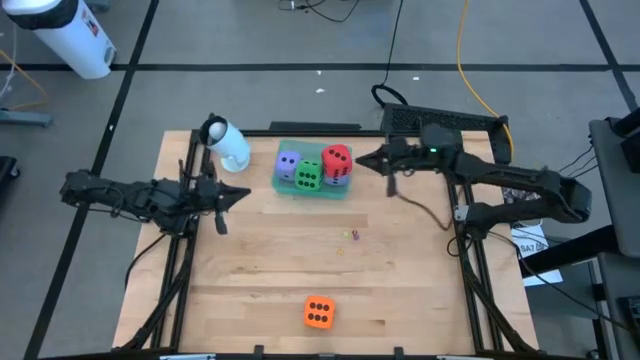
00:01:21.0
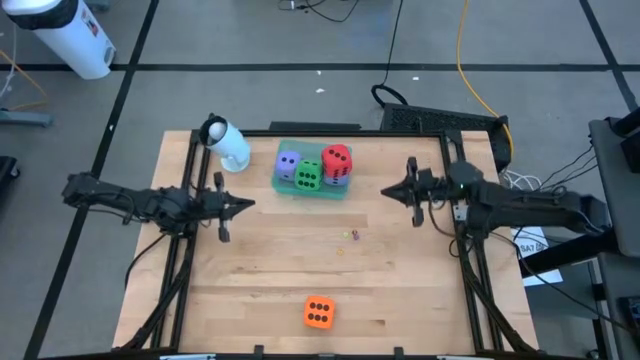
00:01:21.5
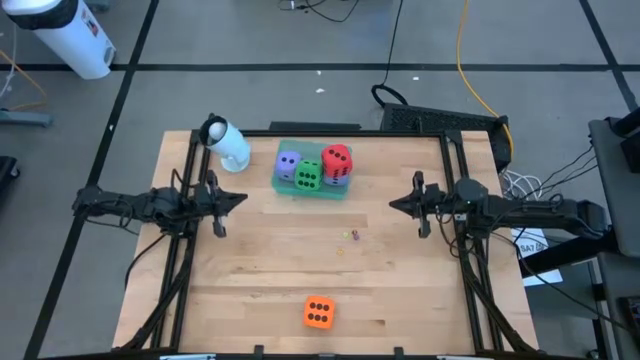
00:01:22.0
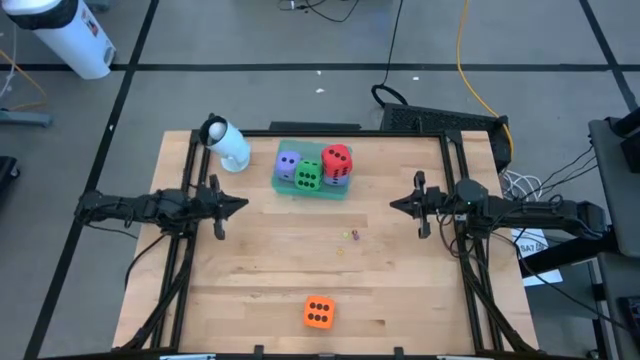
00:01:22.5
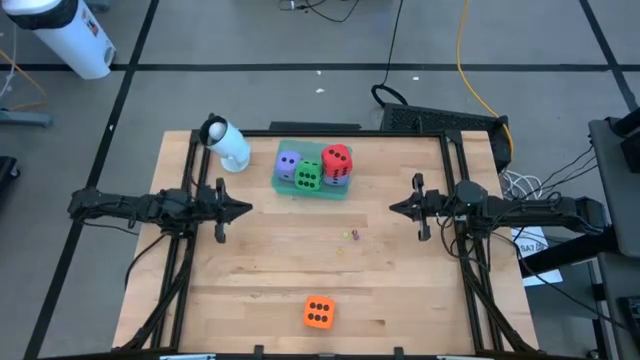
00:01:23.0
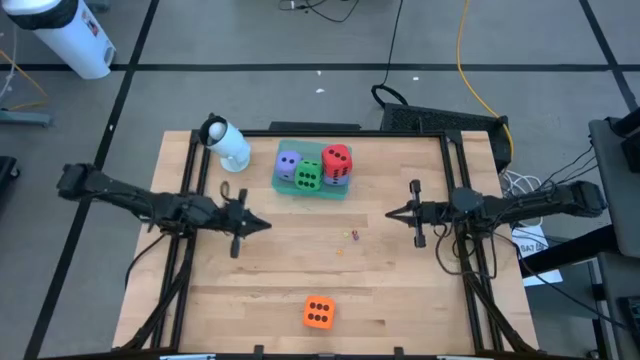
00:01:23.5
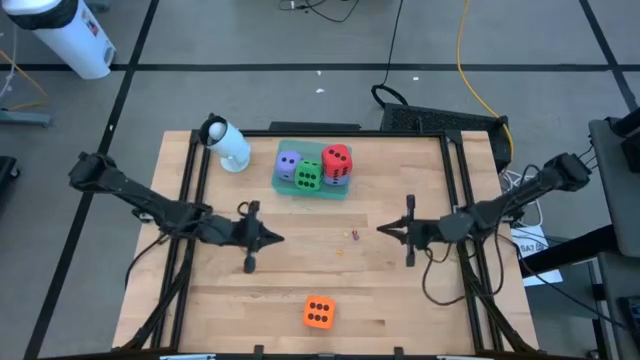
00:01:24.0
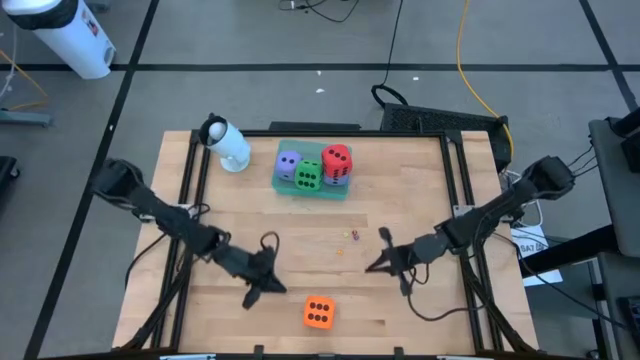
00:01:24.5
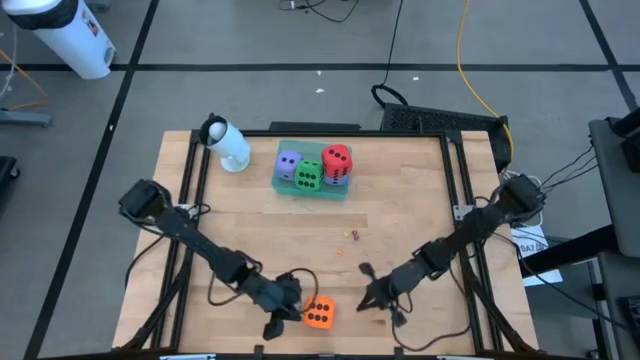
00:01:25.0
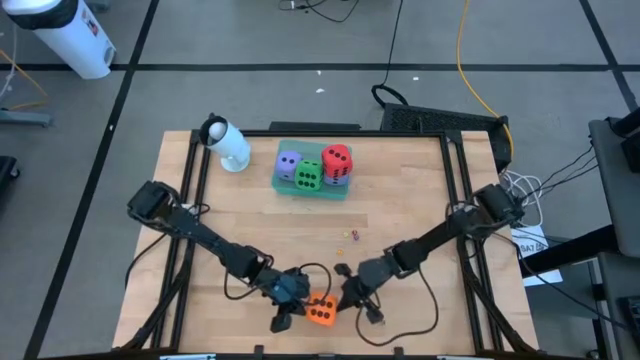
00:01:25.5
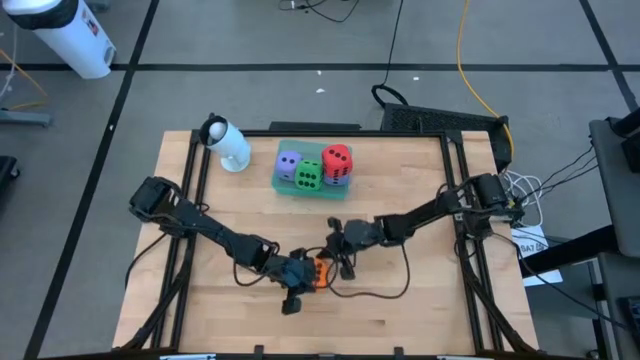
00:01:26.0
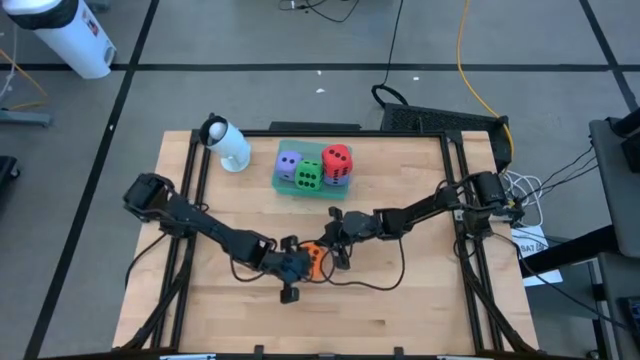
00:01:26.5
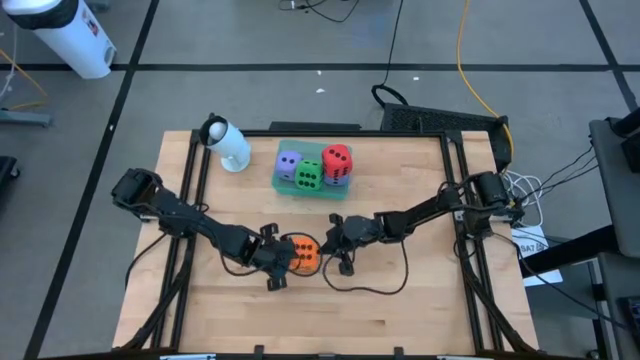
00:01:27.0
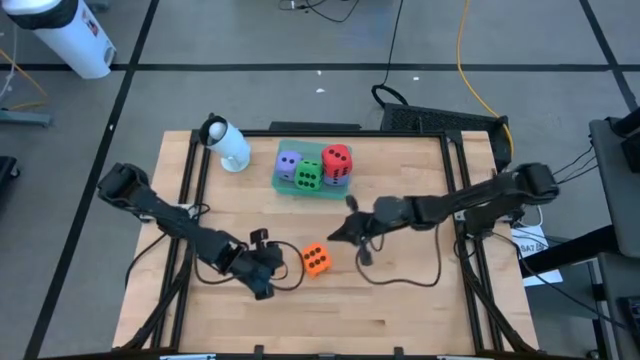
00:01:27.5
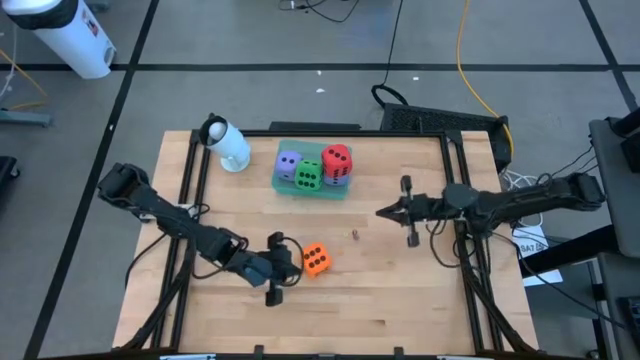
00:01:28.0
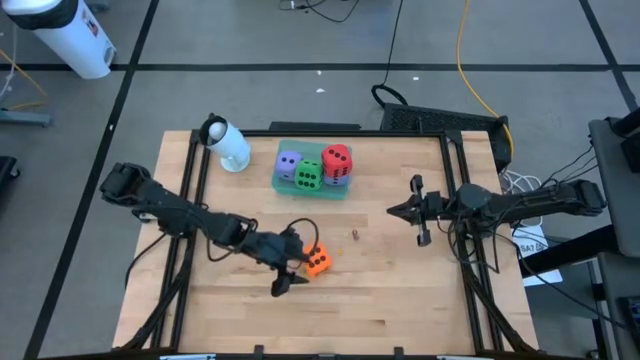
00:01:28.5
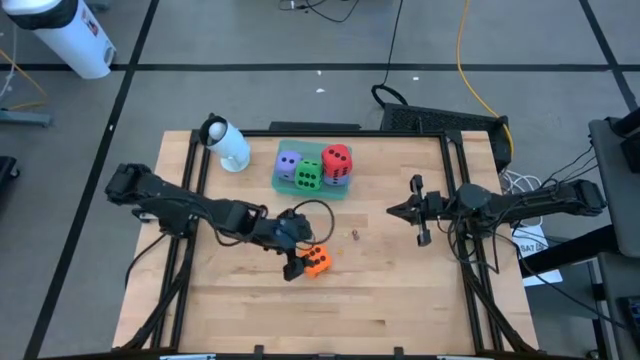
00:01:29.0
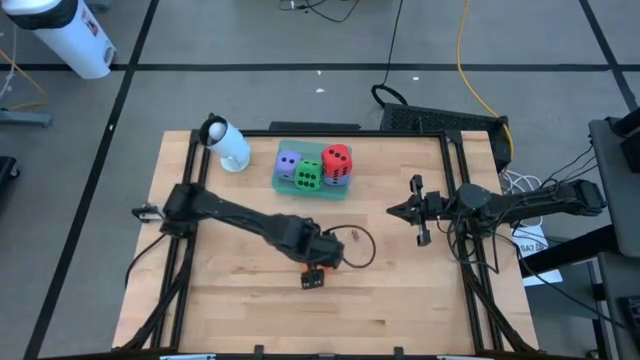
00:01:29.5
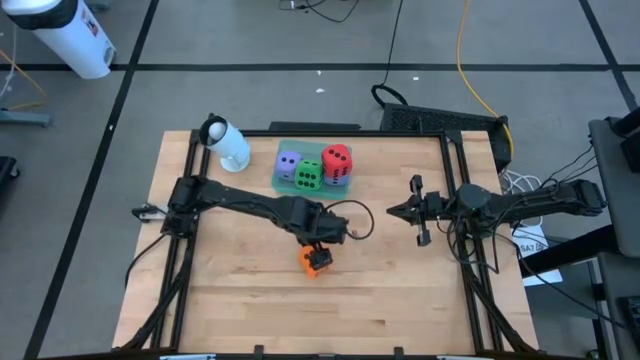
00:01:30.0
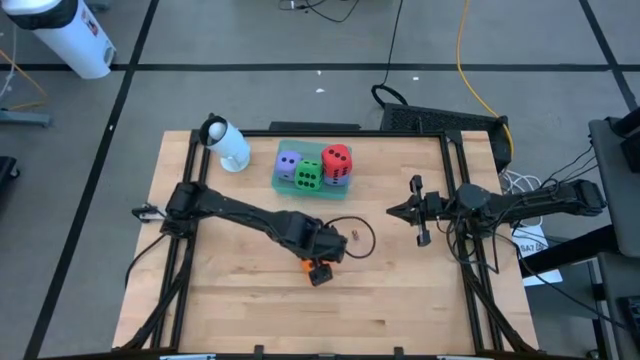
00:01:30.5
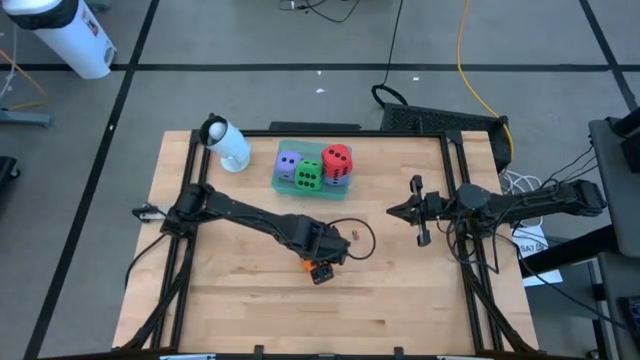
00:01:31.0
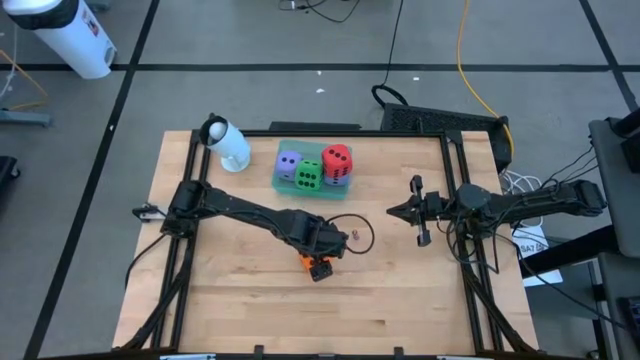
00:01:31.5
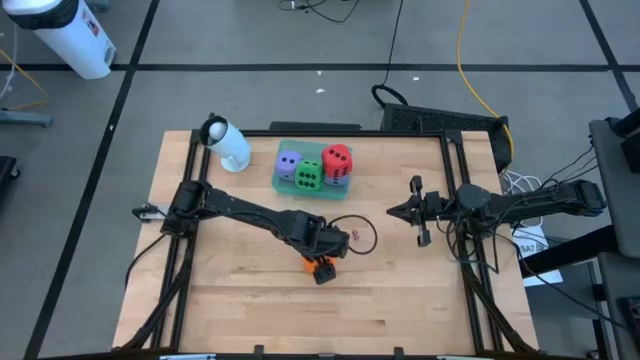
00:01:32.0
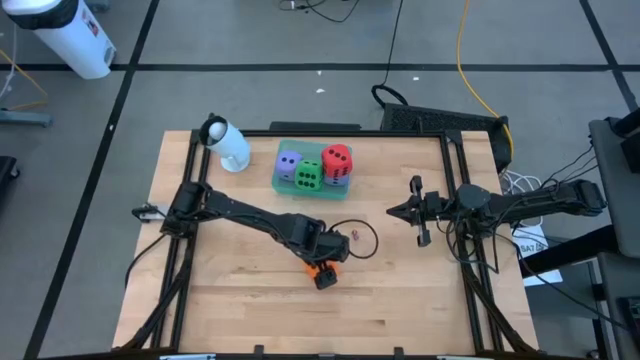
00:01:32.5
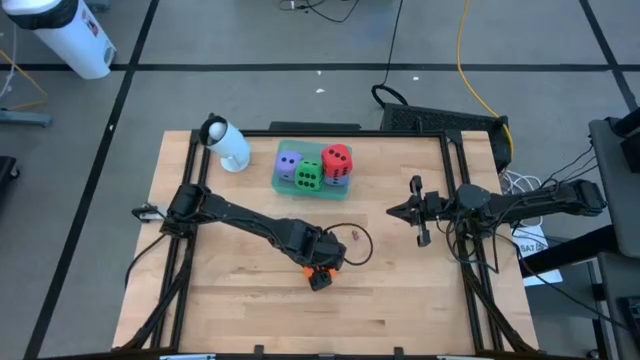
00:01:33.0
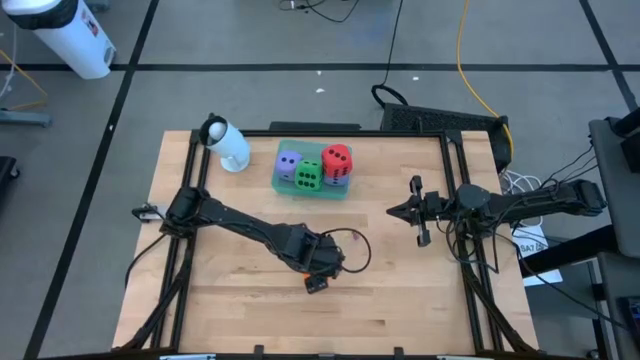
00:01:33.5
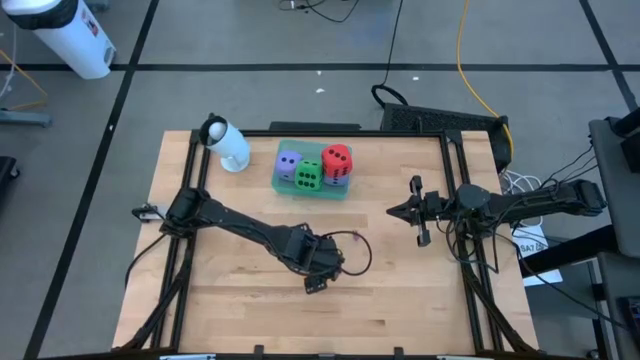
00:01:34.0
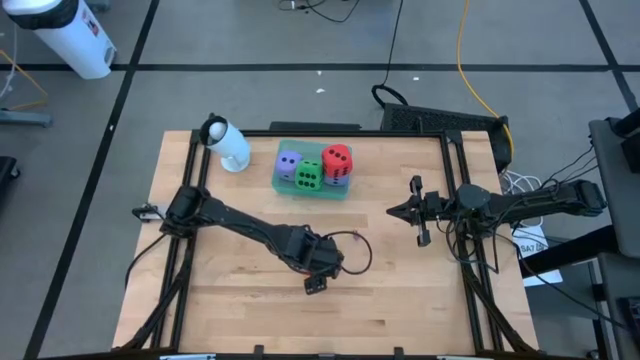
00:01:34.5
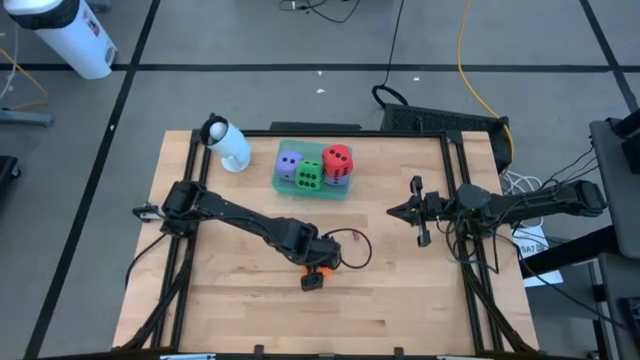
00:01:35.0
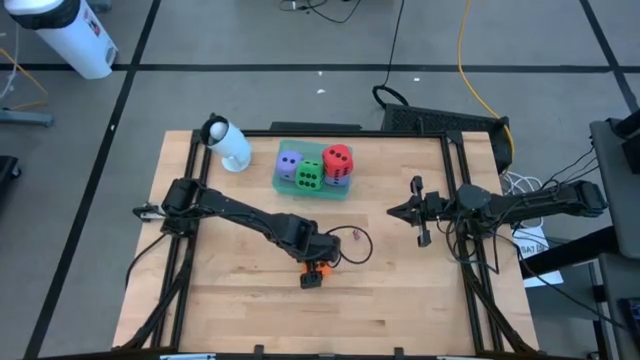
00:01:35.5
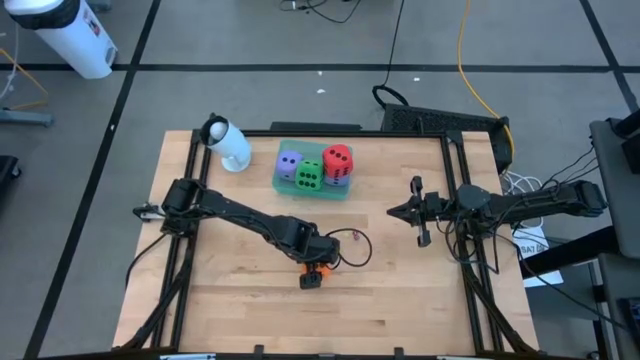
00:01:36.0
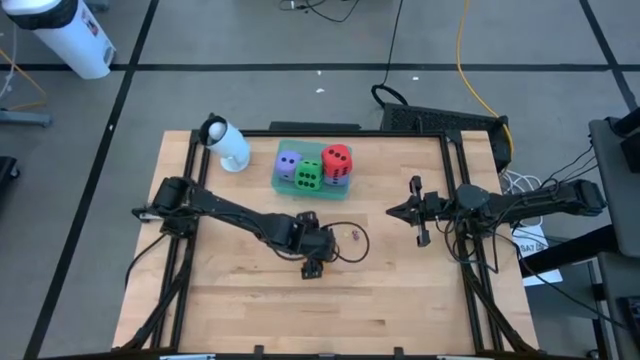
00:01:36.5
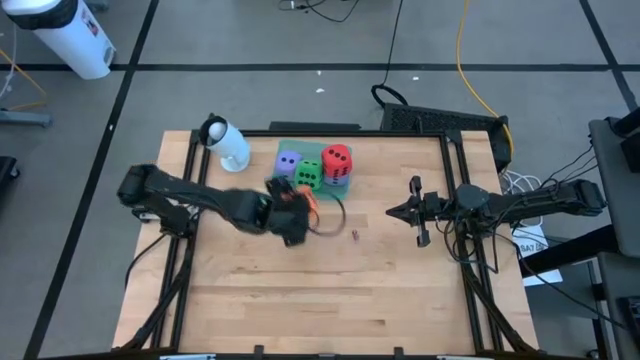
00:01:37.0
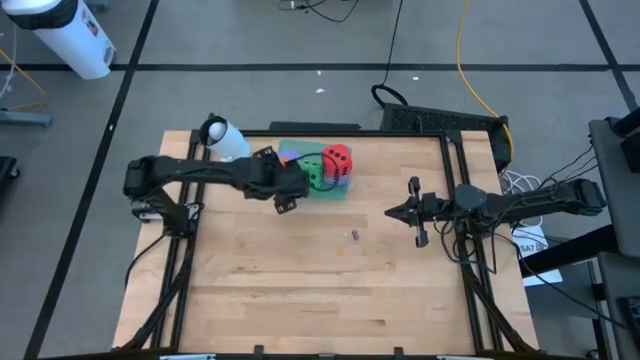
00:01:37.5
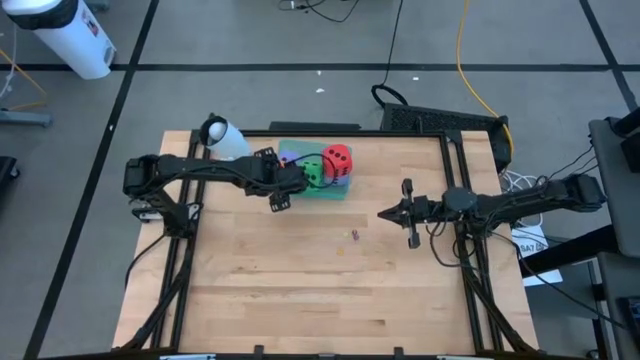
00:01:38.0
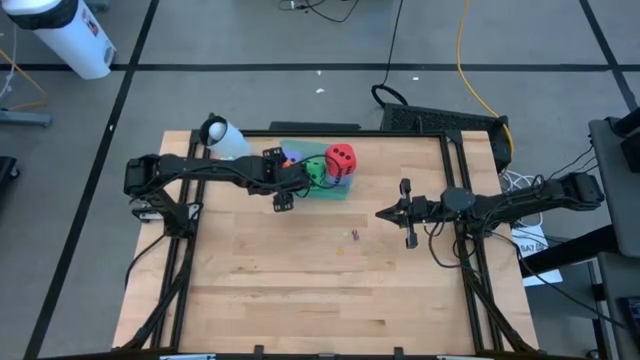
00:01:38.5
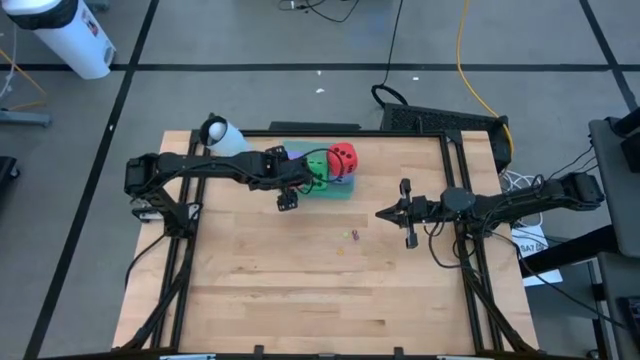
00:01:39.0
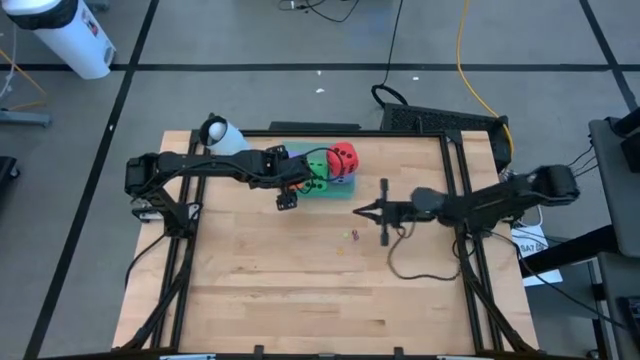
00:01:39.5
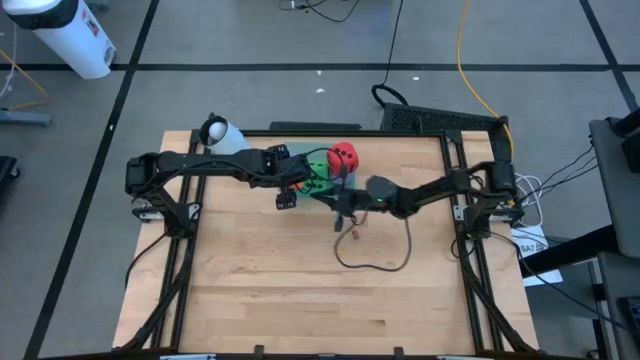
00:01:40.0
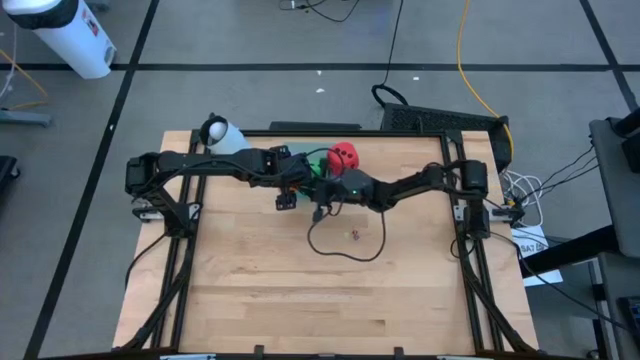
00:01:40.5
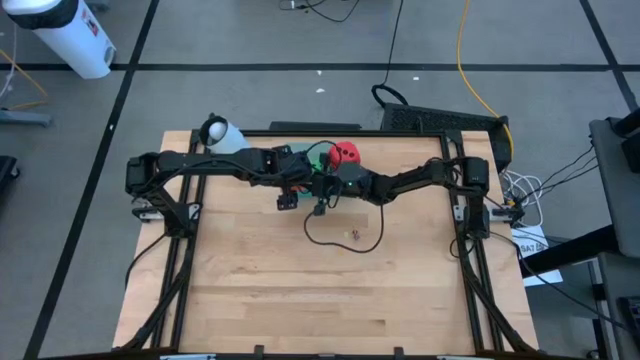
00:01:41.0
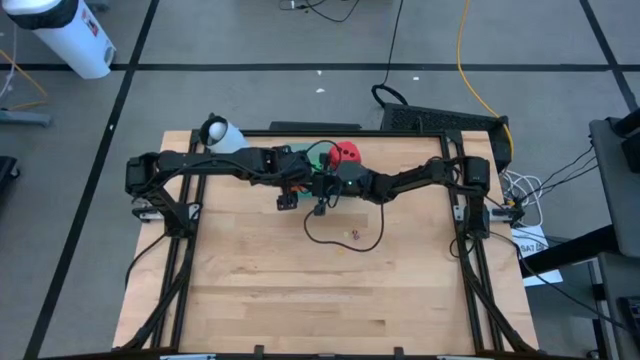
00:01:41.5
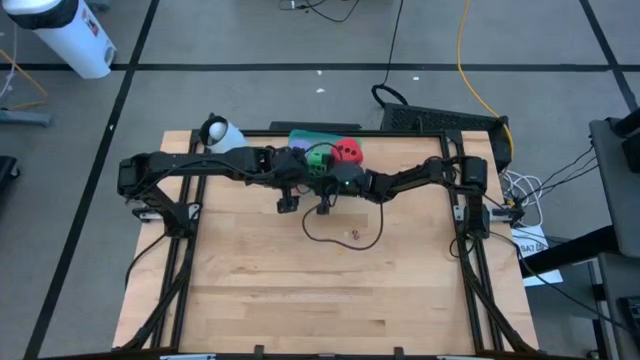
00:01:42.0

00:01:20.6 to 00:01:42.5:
Task: Pick & Place Dice
Put the big orange dice into the green bin
